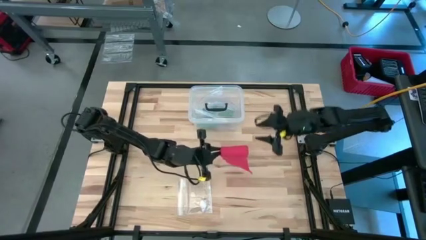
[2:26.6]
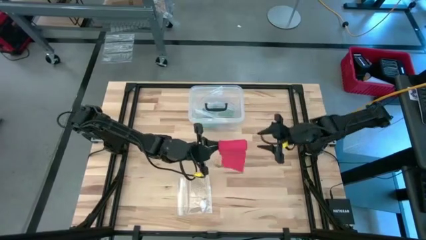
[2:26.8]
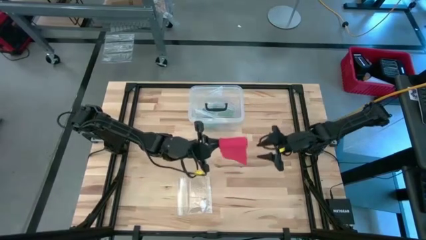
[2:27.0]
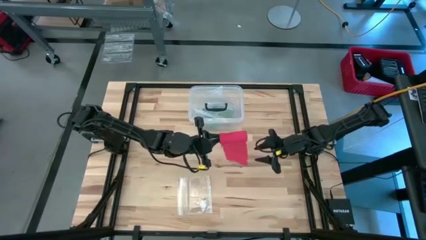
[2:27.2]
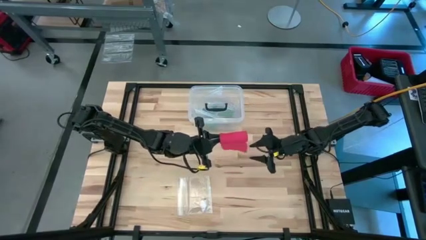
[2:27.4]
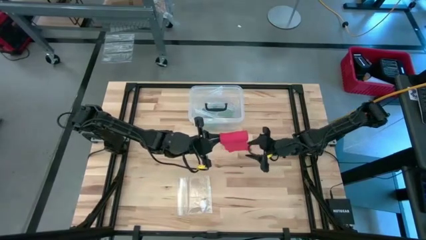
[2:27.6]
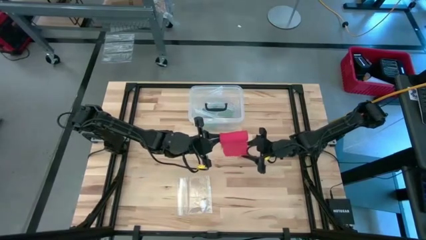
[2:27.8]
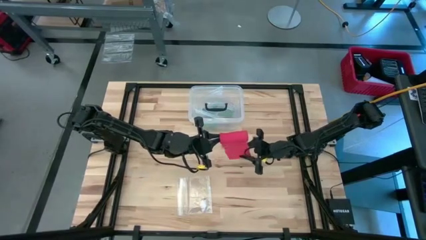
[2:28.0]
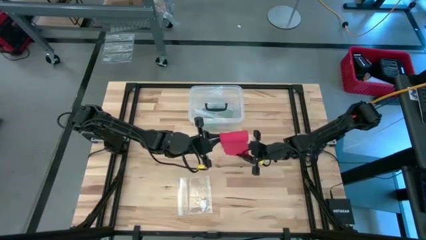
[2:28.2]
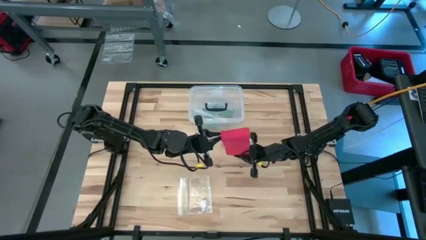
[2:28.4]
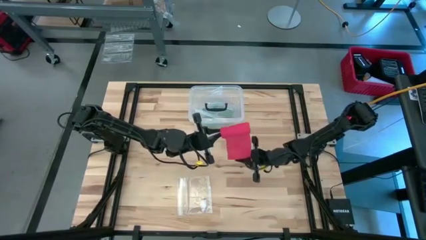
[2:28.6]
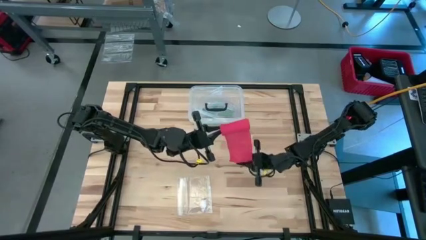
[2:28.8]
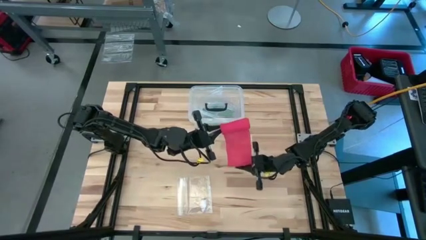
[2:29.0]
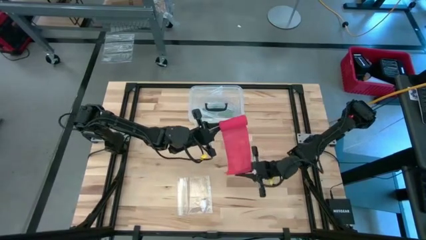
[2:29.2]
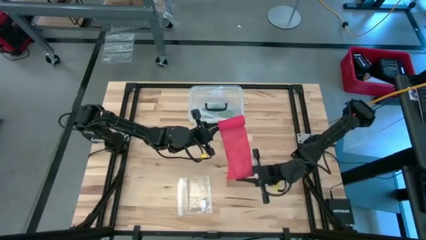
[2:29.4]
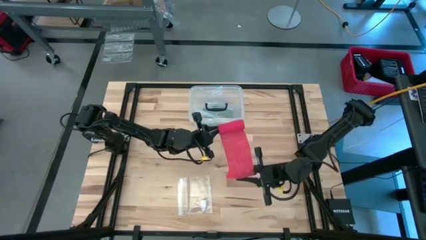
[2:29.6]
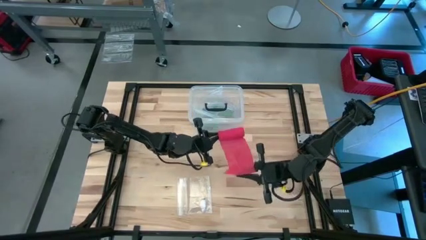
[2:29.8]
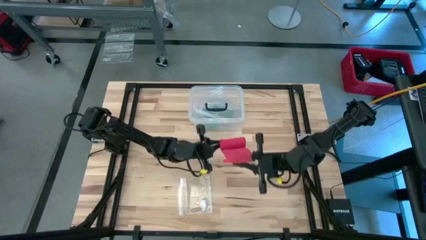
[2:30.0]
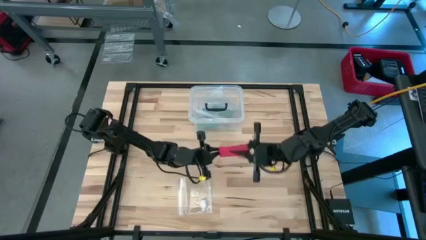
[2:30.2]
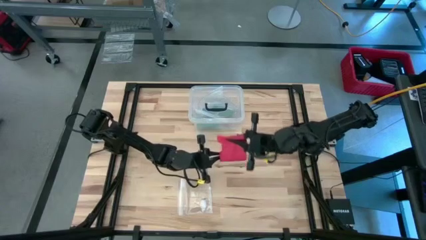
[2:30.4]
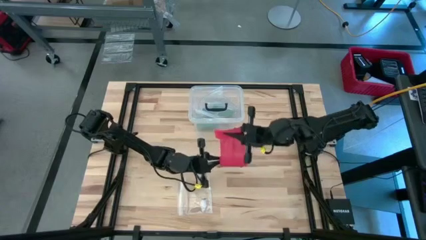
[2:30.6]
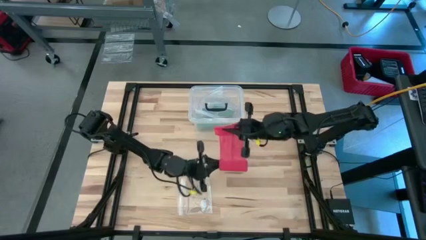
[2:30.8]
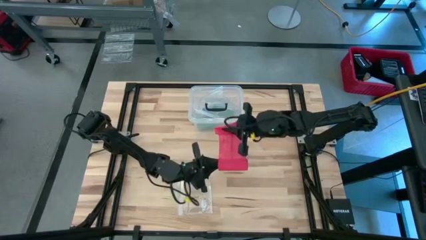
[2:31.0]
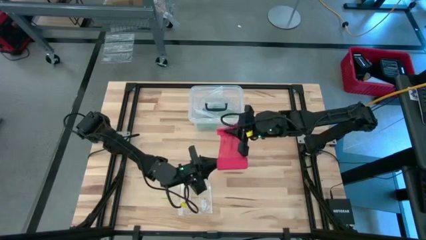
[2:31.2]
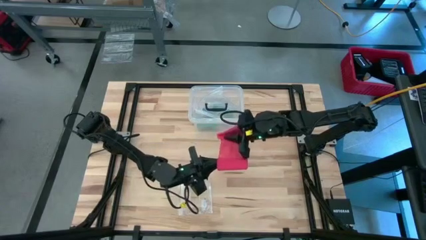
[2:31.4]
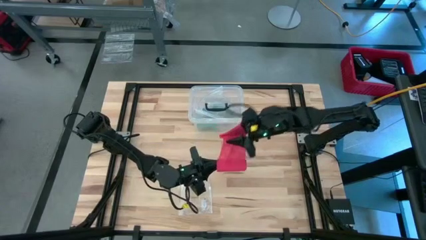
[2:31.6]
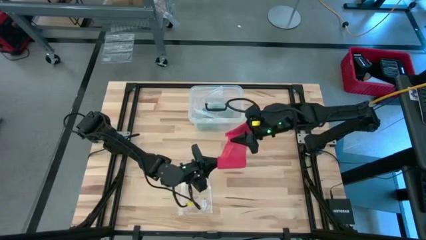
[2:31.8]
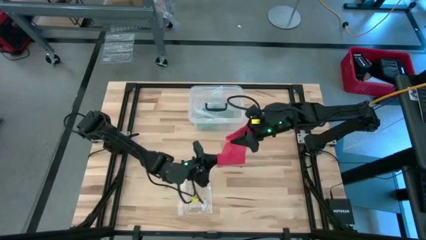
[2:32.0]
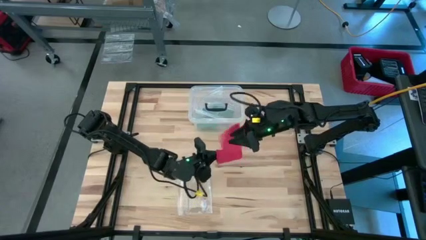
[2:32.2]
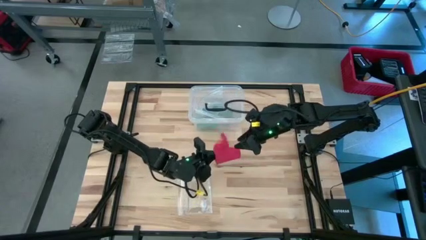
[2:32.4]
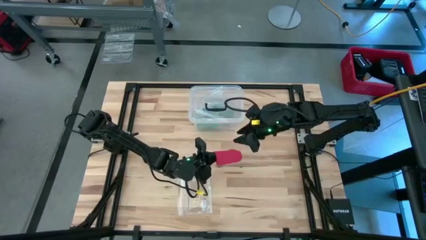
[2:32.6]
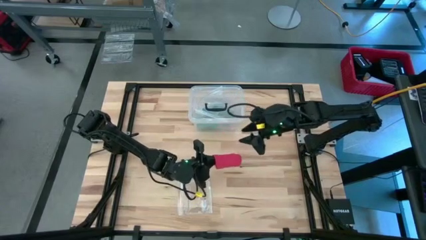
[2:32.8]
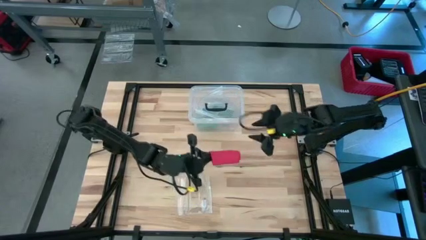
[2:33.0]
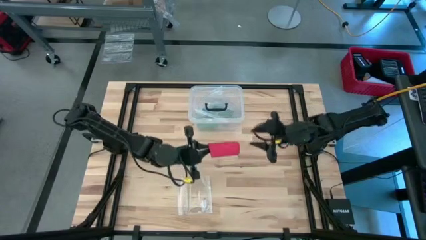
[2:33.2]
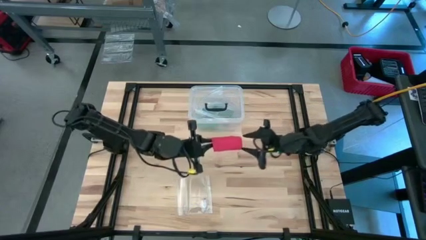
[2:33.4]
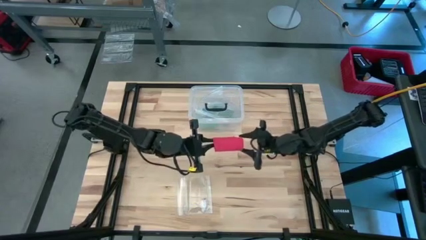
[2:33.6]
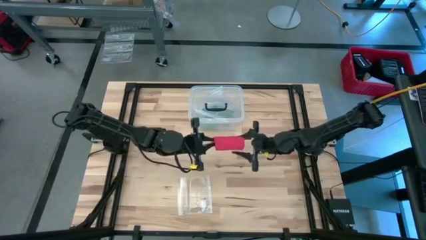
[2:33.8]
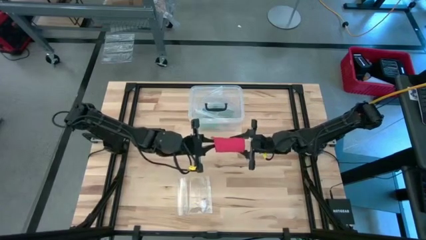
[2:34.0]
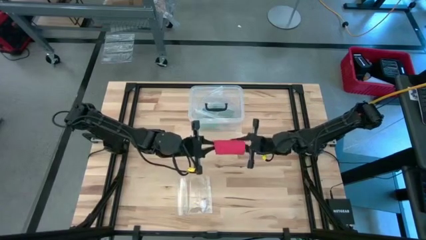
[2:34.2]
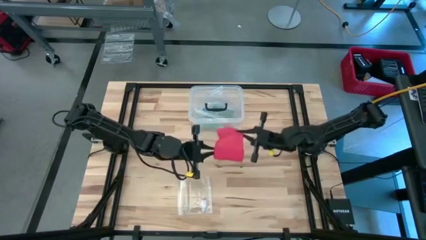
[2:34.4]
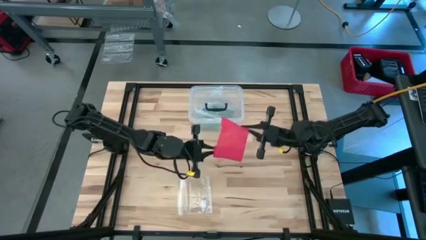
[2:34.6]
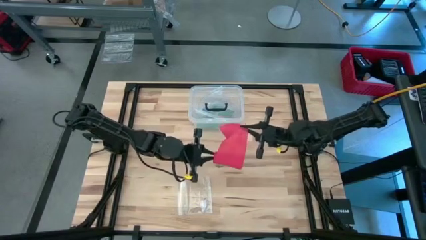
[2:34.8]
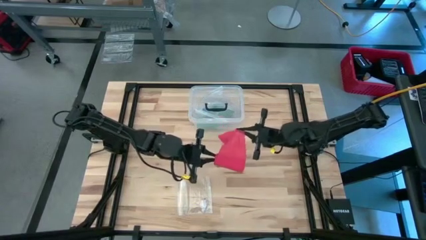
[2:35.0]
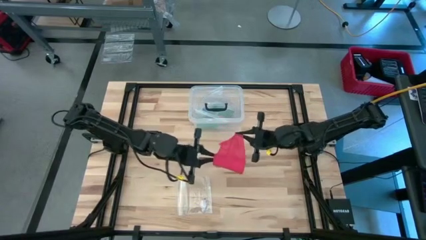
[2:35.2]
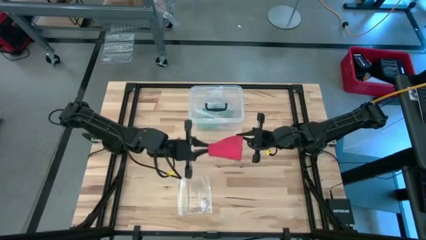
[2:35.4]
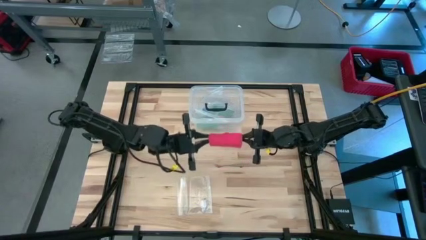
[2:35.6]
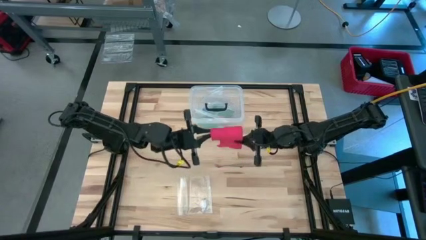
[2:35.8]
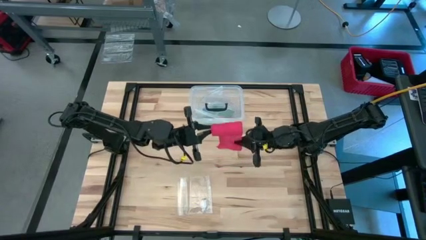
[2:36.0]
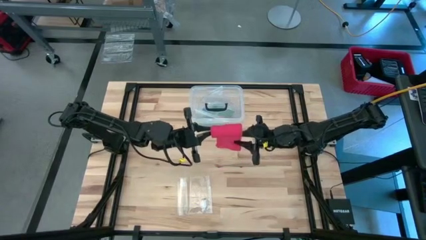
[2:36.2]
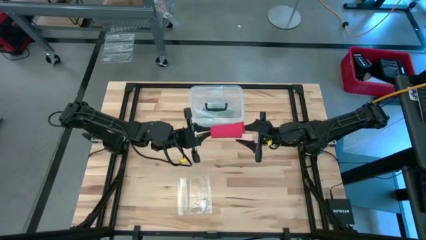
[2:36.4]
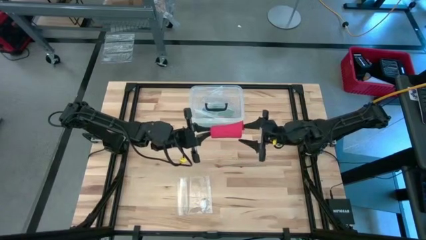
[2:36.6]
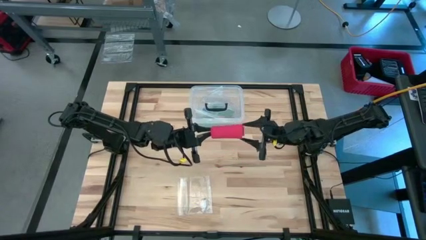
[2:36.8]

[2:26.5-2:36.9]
Task: Roll bandage
Roll the red bandage

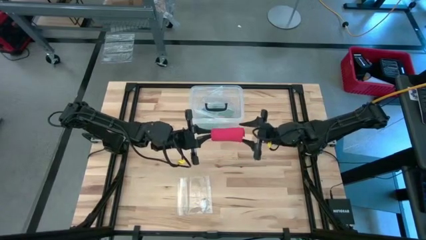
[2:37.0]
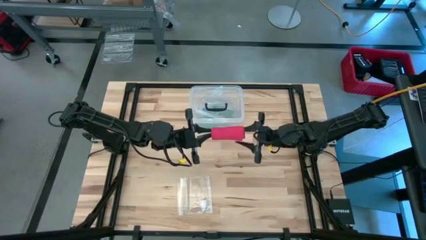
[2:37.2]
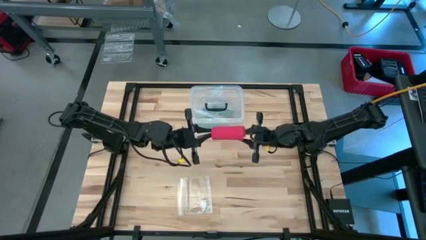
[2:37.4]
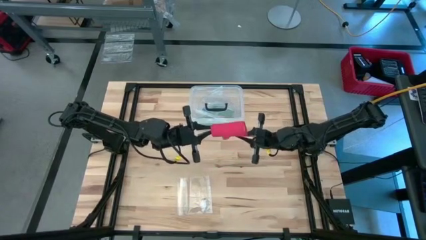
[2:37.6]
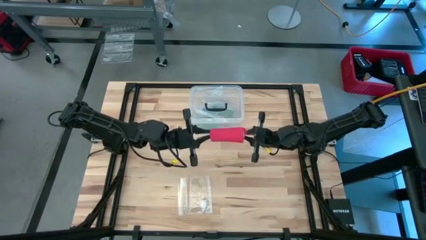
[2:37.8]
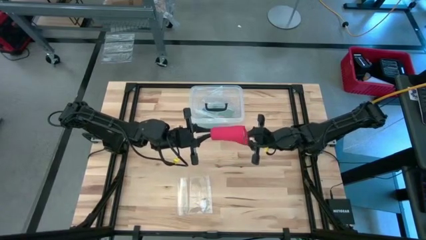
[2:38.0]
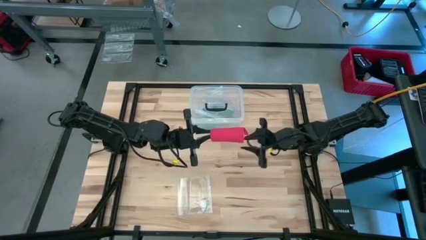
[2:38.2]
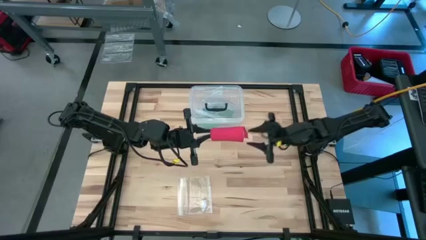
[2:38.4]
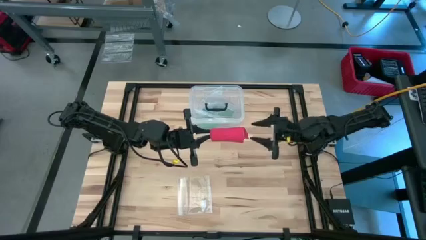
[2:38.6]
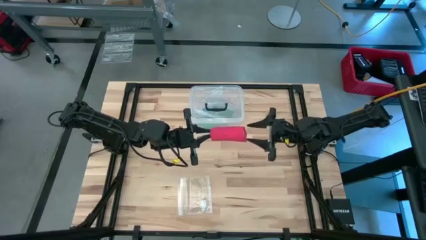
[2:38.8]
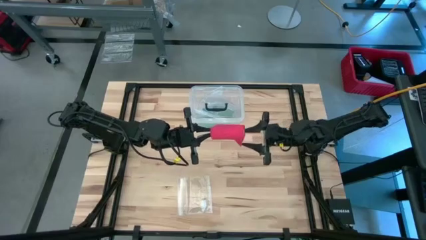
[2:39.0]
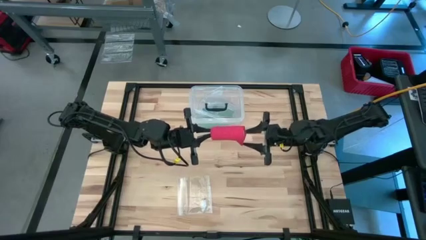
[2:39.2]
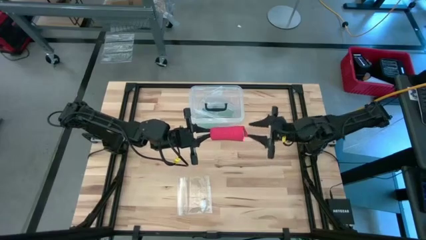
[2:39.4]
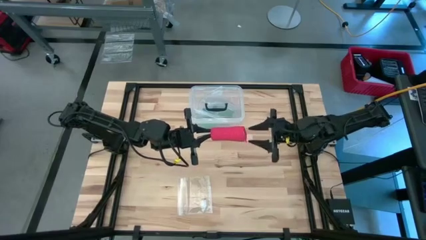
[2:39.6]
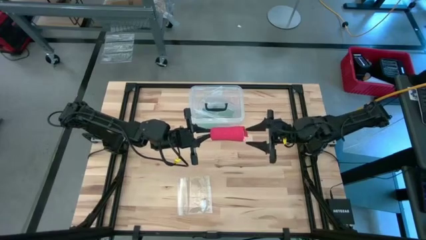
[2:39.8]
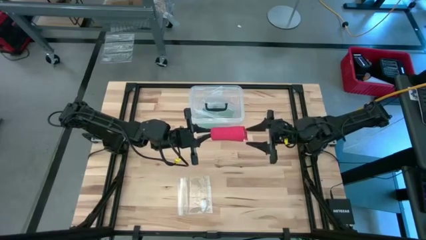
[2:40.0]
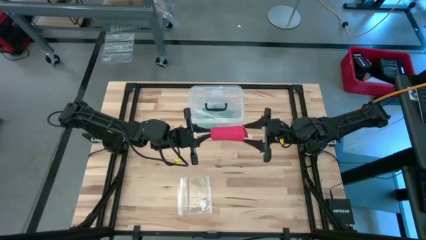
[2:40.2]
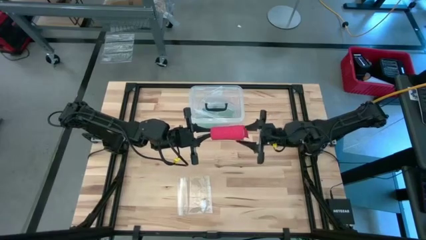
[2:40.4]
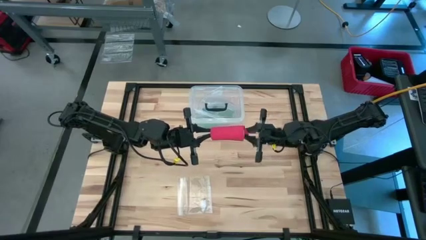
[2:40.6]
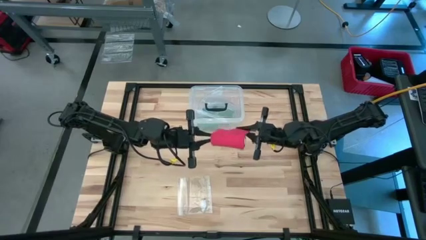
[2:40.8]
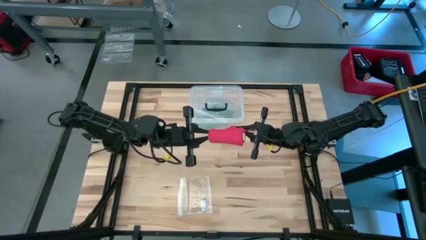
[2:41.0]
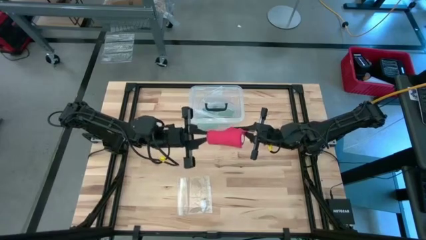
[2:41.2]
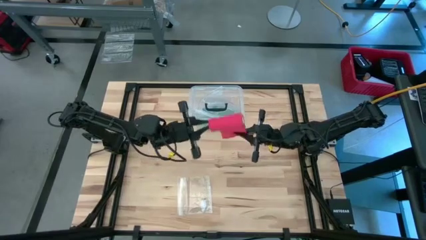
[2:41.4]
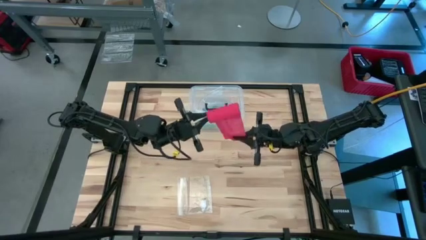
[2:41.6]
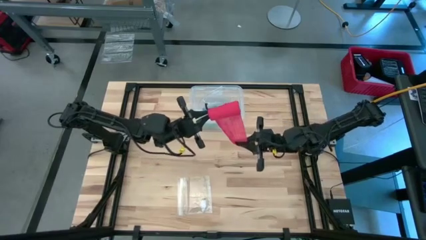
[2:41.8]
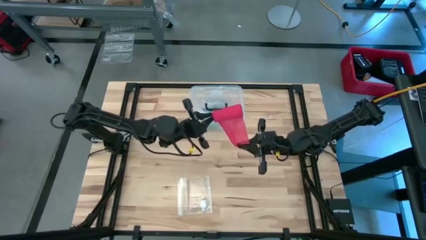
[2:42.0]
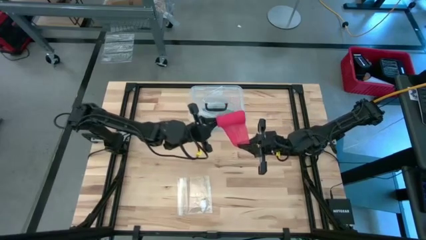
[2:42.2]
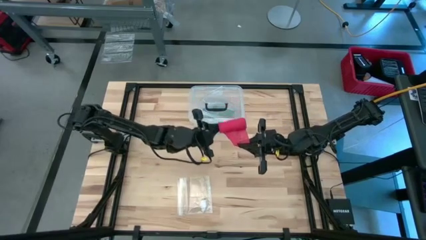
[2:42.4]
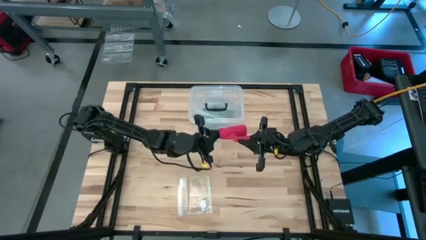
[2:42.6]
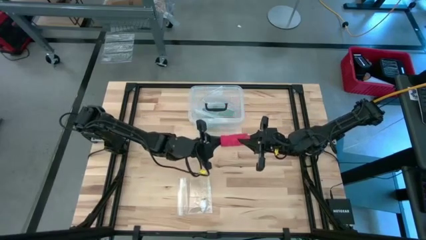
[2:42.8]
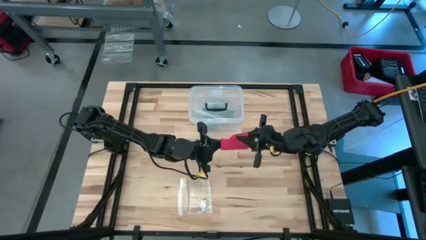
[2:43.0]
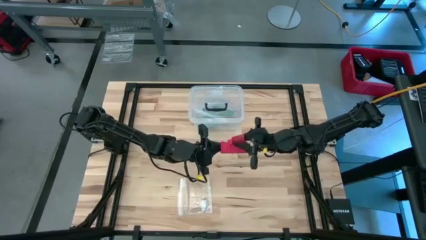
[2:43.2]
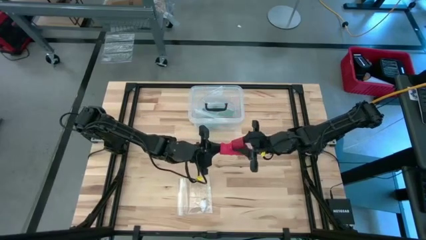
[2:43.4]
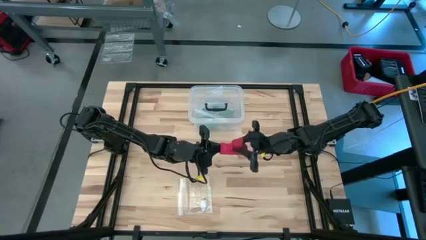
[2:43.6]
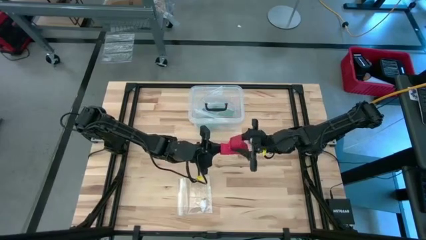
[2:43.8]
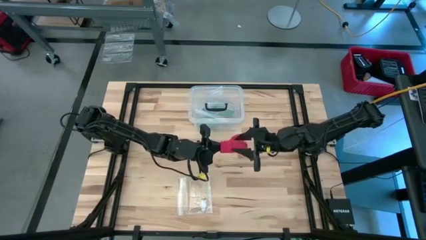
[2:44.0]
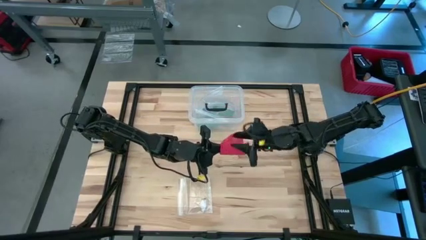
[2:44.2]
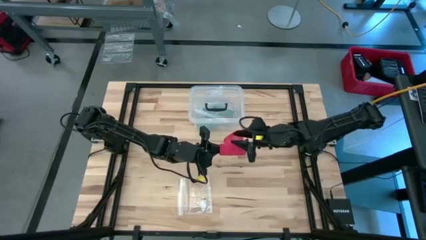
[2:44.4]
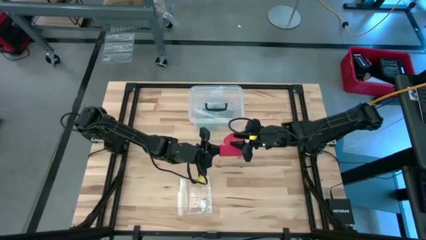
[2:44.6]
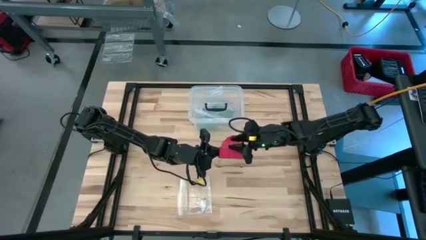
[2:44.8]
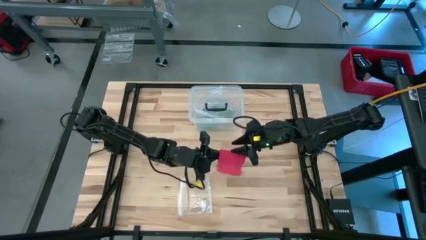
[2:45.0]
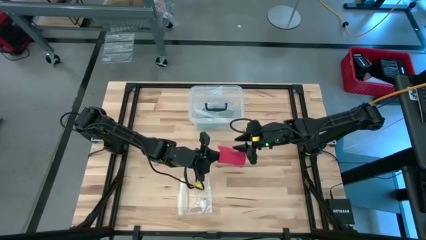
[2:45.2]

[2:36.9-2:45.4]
Roll the red bandage
